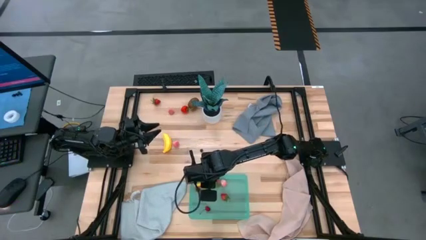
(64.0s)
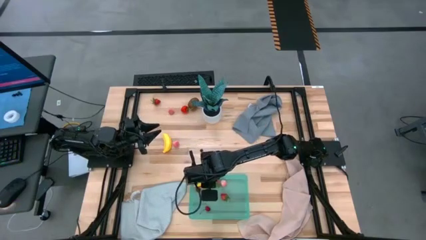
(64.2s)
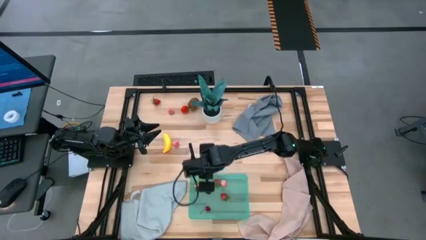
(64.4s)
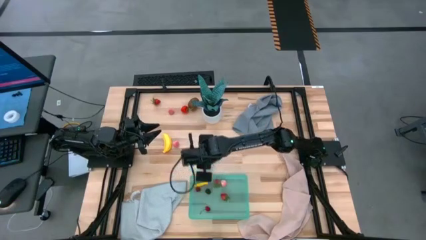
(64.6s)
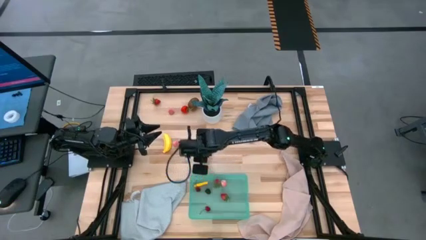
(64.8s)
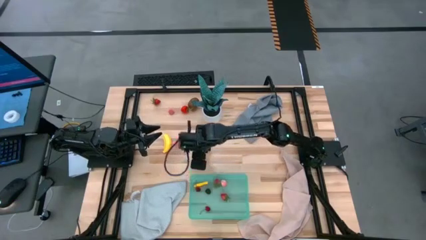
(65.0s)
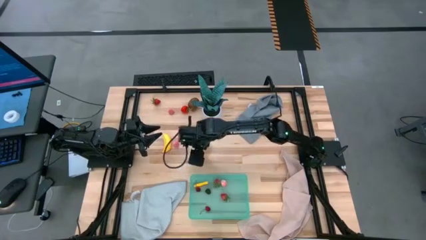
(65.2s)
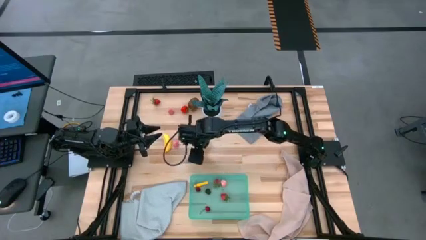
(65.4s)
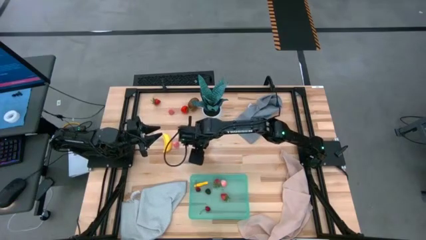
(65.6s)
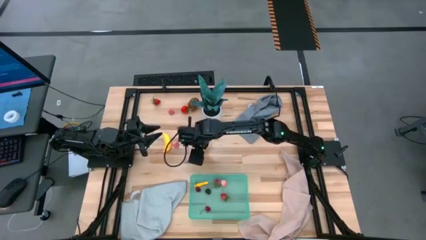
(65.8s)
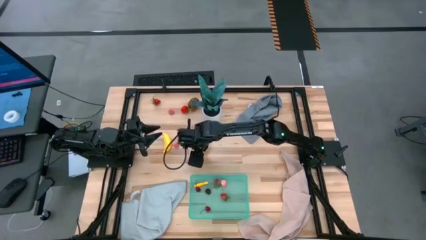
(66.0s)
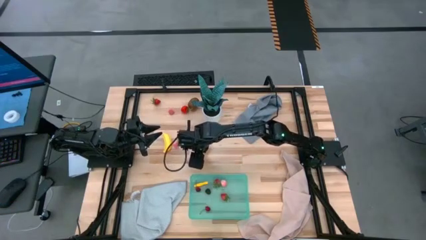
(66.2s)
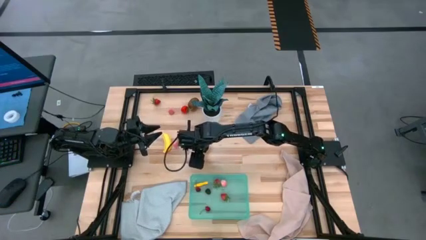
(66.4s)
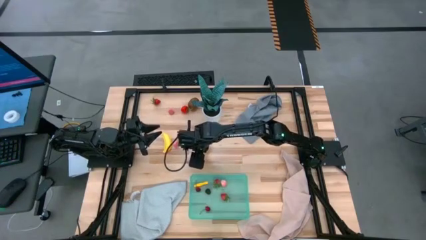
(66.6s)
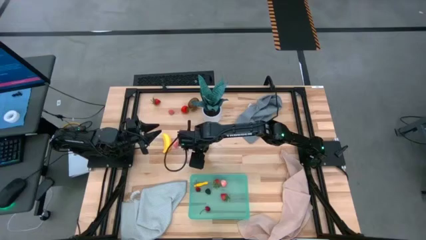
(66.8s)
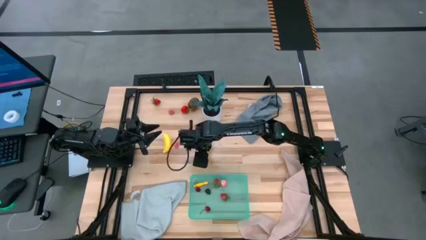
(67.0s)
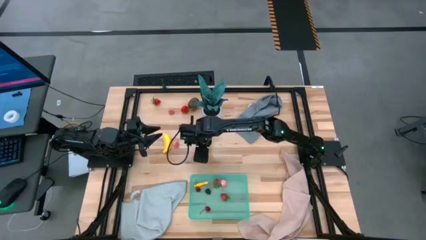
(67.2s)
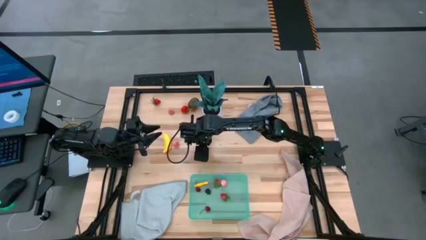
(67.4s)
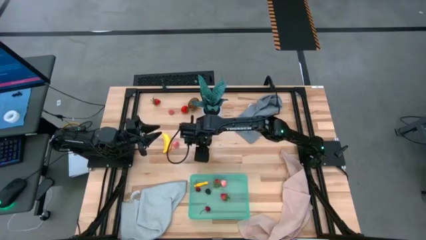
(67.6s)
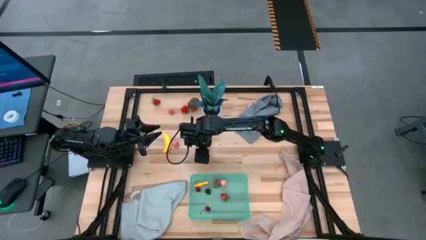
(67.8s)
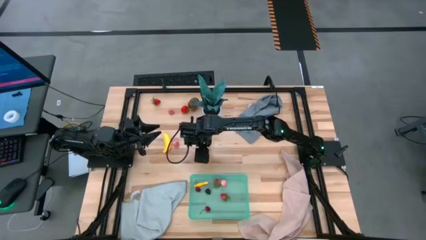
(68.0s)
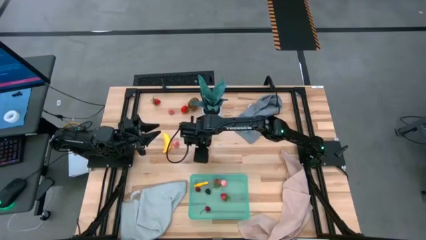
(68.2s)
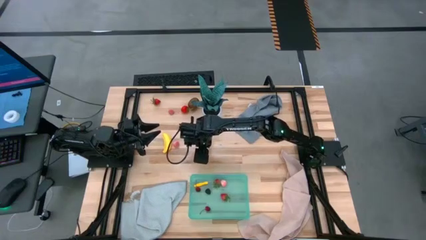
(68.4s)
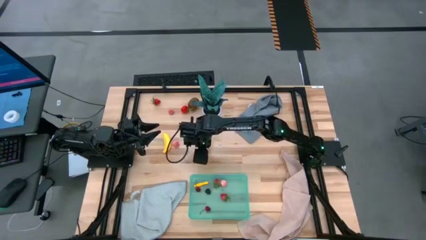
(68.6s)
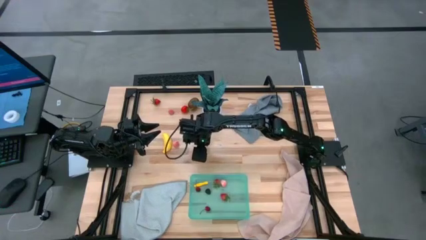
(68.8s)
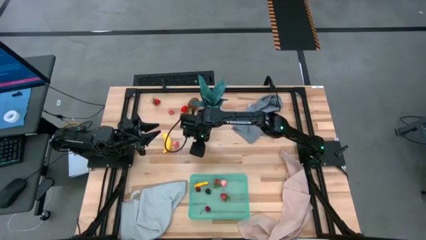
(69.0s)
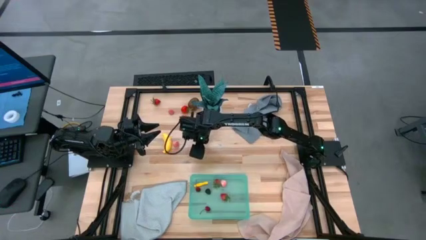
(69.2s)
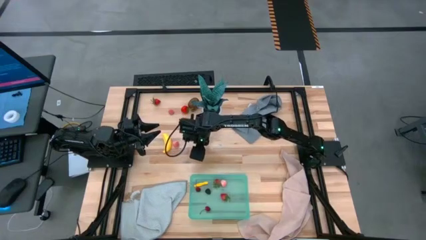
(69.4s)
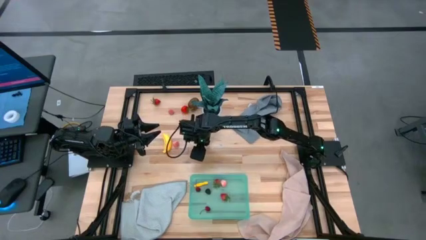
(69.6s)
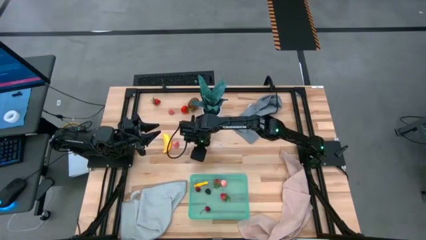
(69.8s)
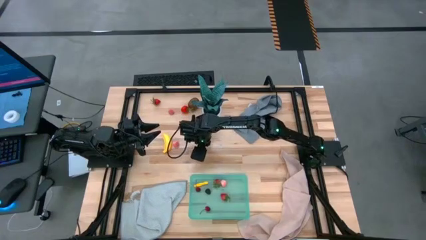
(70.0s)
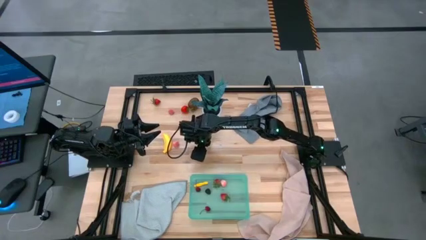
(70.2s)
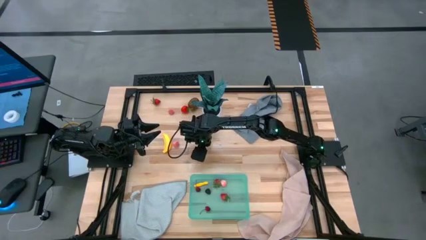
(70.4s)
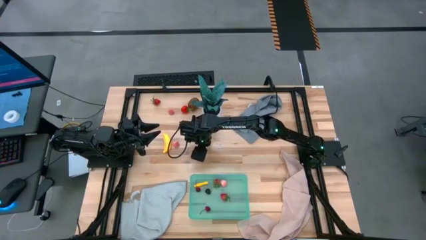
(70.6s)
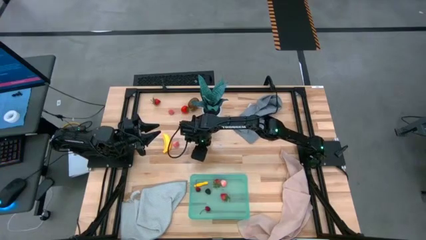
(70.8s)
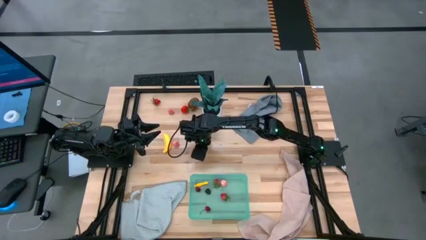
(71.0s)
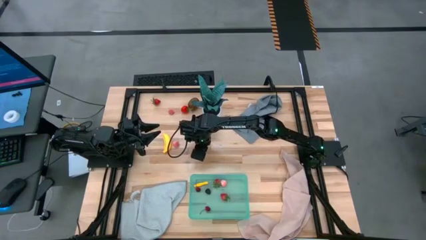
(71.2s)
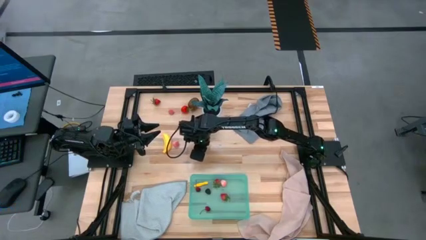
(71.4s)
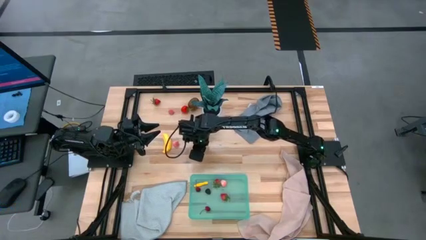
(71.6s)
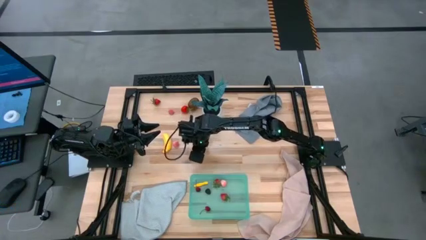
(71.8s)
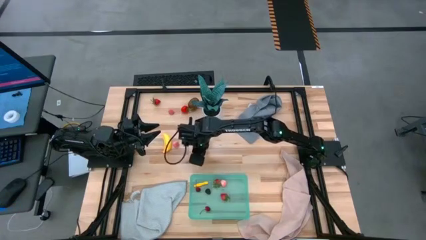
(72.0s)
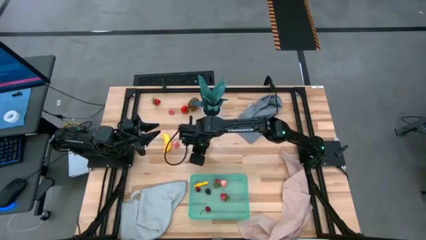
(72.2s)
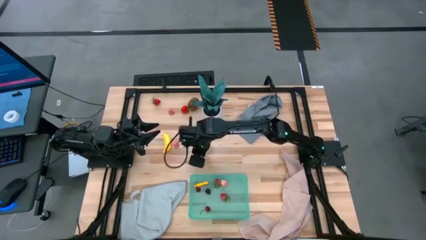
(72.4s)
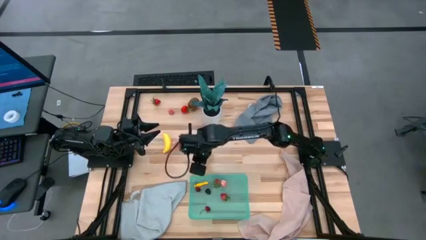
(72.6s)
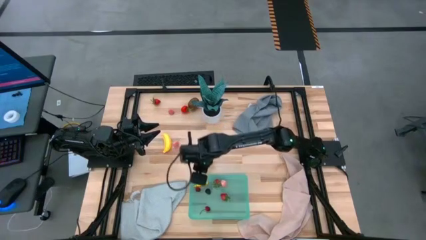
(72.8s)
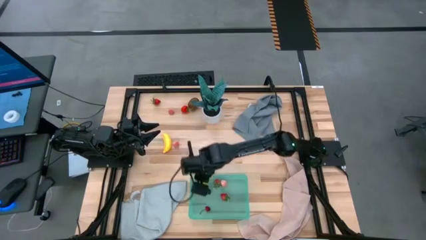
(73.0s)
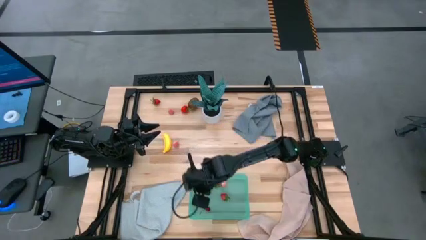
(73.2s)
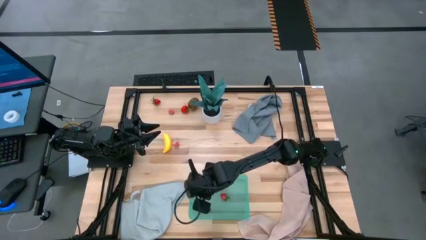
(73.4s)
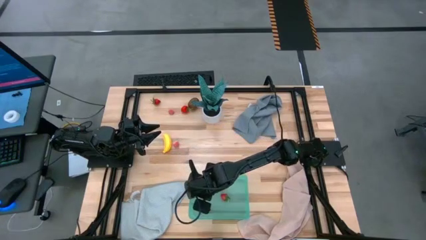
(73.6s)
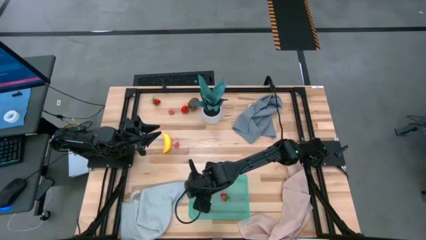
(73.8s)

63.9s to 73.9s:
Task: Pick and placing Produce into tupperware
Put the blueberry into the green bin

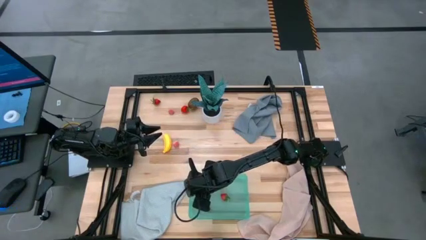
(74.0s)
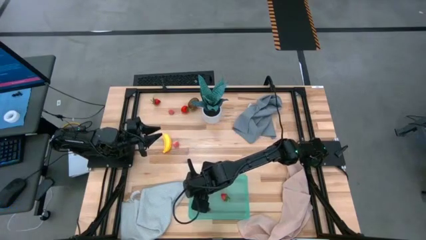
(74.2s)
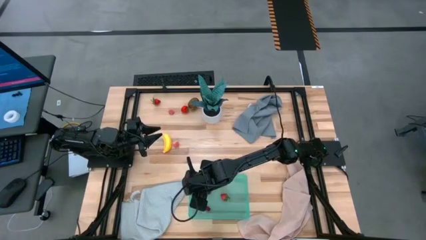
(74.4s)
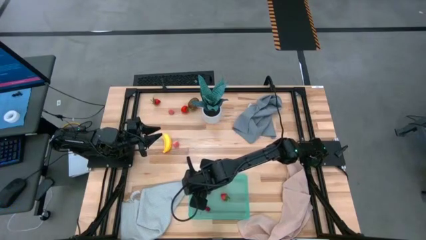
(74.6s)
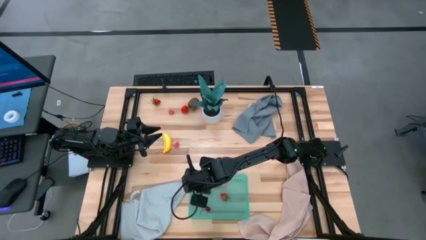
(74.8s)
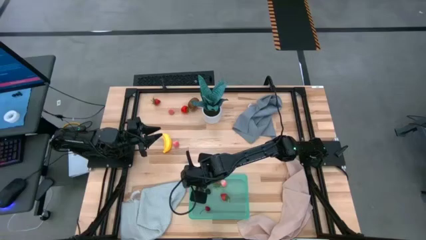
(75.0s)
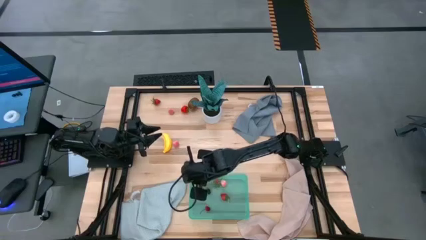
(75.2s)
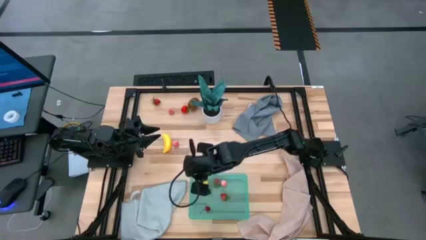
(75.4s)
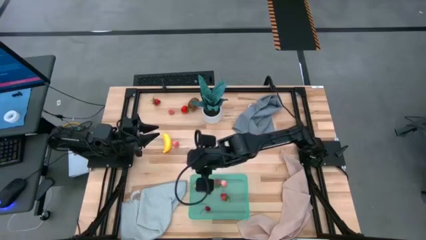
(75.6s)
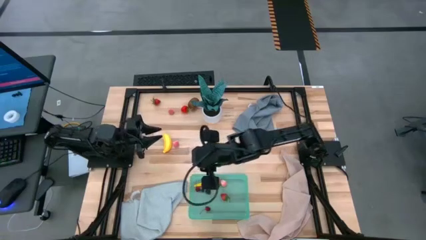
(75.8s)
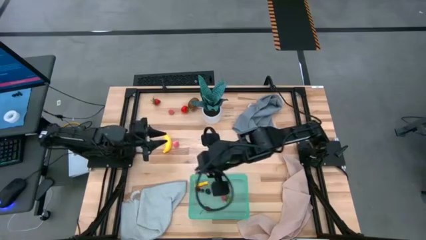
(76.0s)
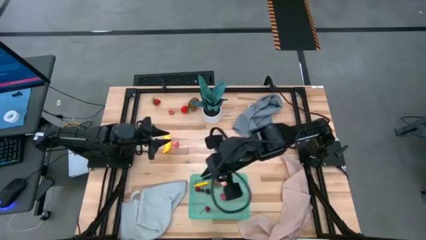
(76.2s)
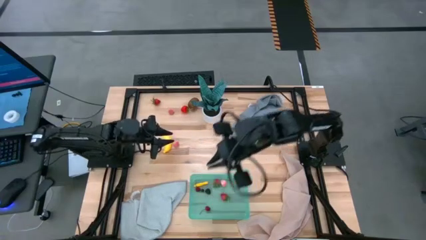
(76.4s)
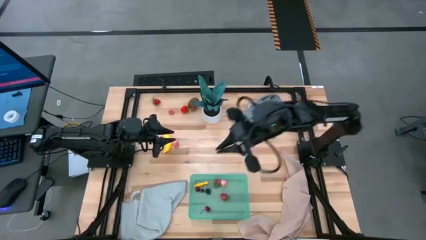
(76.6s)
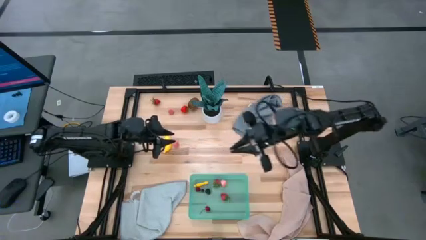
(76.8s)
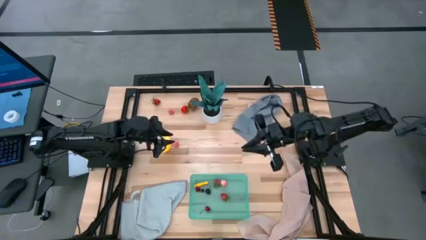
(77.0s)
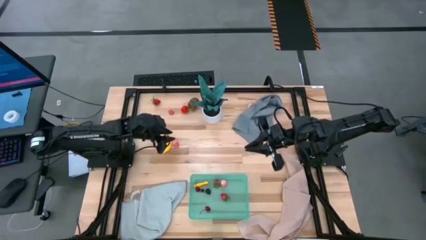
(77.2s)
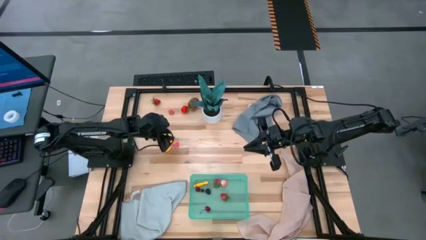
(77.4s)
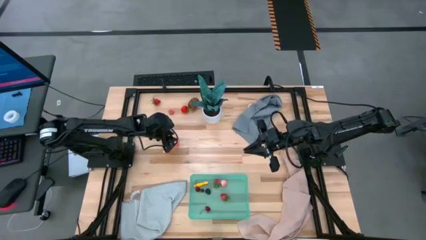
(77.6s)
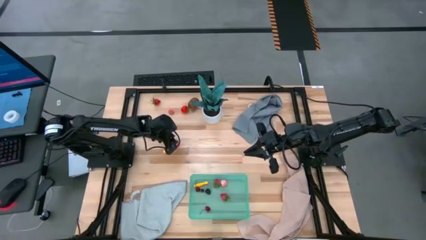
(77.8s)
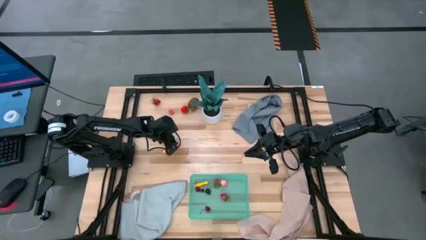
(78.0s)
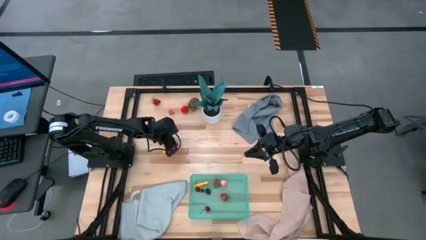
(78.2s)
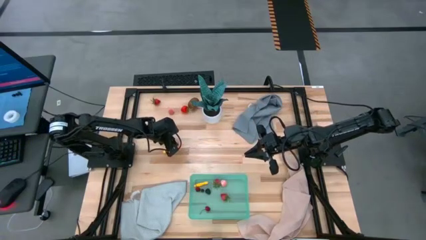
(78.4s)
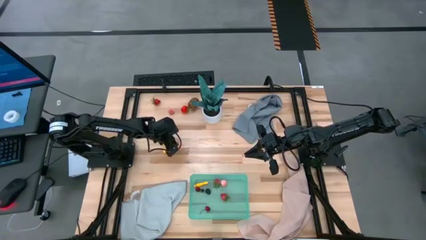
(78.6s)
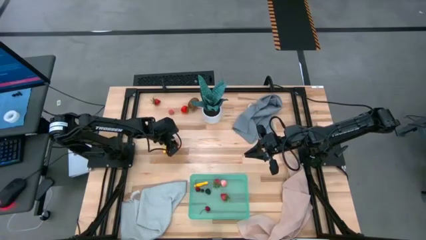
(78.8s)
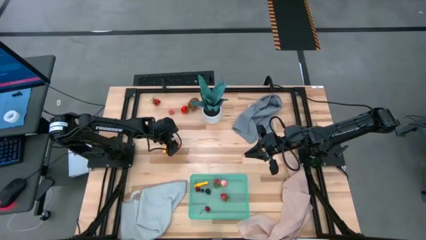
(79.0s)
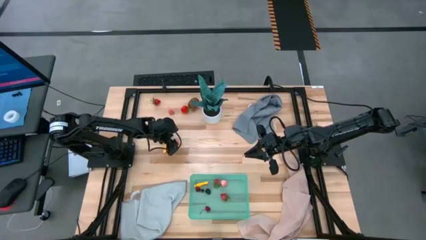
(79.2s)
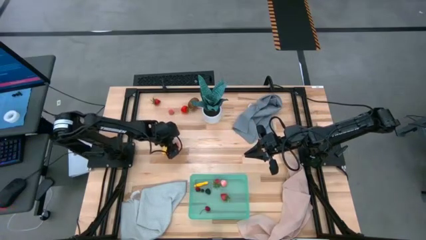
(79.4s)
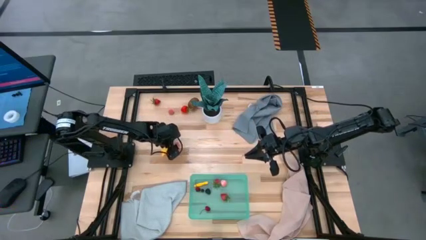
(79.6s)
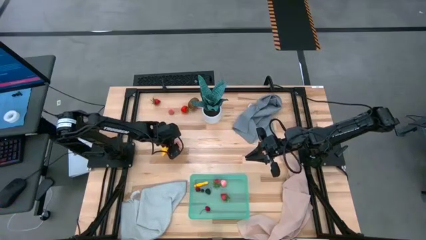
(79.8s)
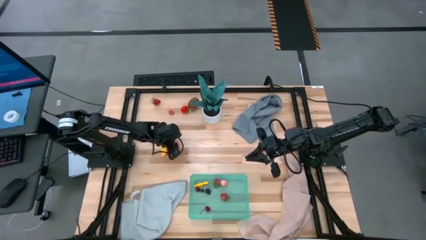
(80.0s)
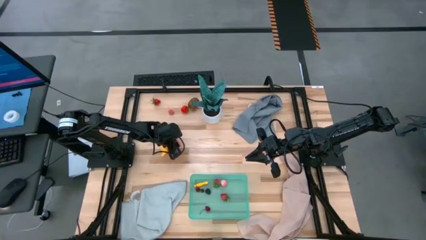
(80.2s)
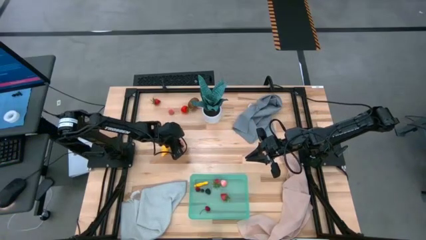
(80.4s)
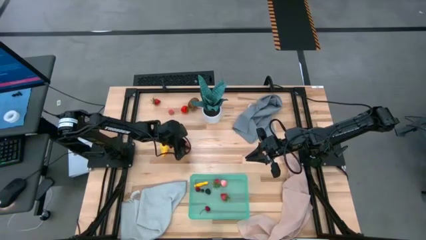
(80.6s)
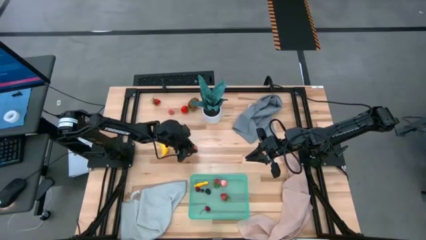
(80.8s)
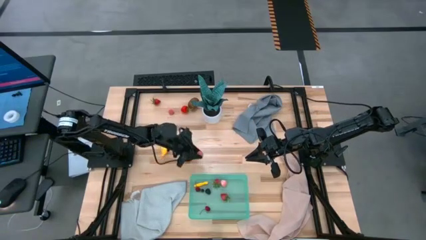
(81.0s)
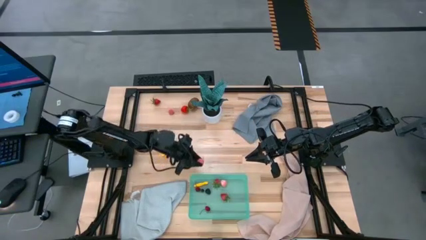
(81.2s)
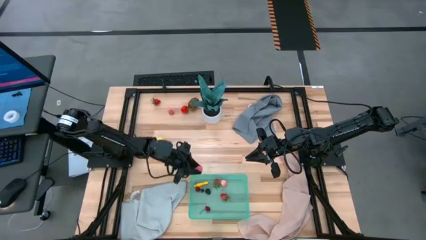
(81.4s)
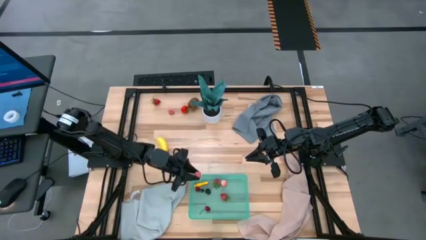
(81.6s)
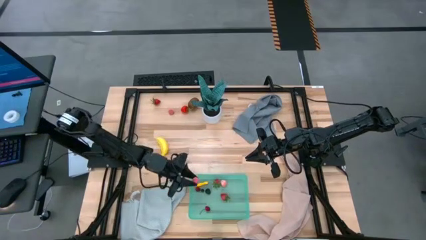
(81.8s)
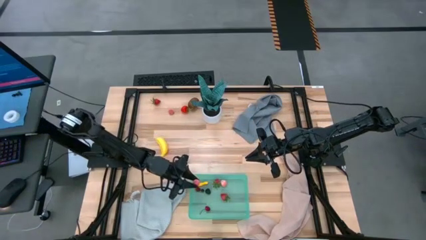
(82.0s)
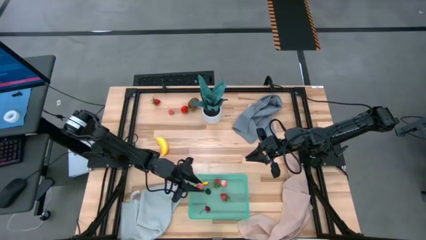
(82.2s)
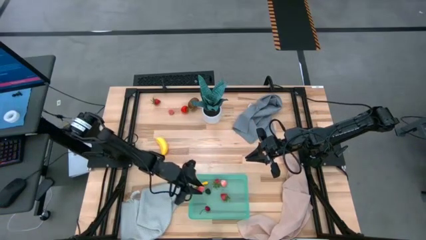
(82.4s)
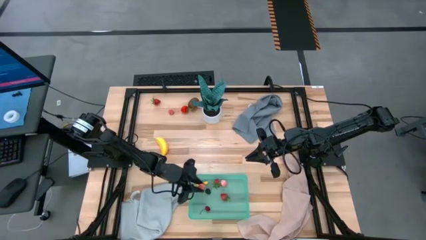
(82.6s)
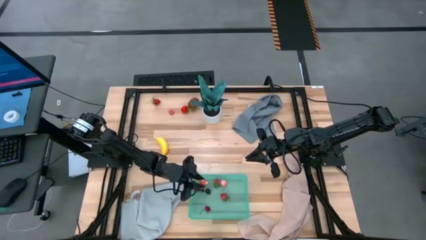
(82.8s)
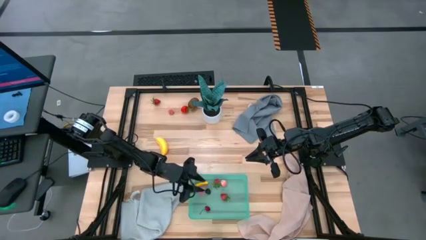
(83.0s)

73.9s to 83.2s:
Put the pink peach into the green bin
